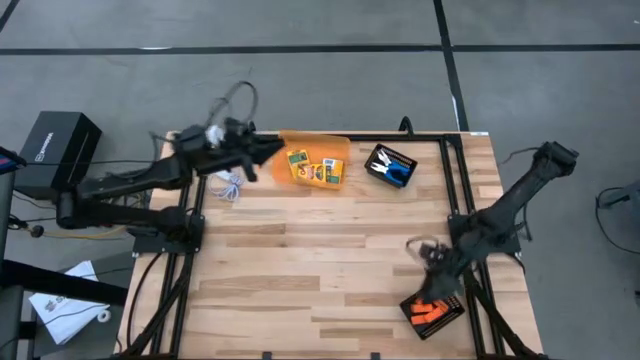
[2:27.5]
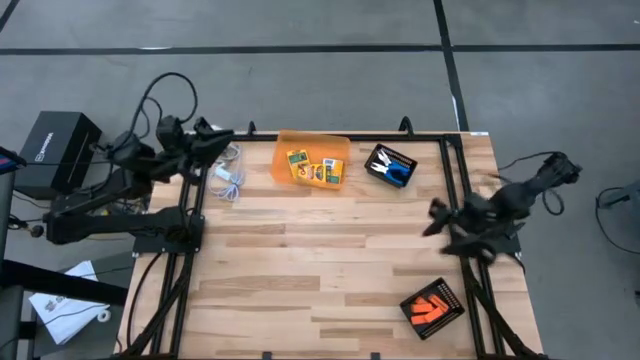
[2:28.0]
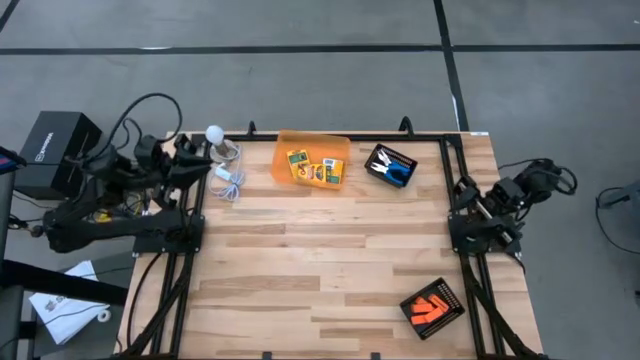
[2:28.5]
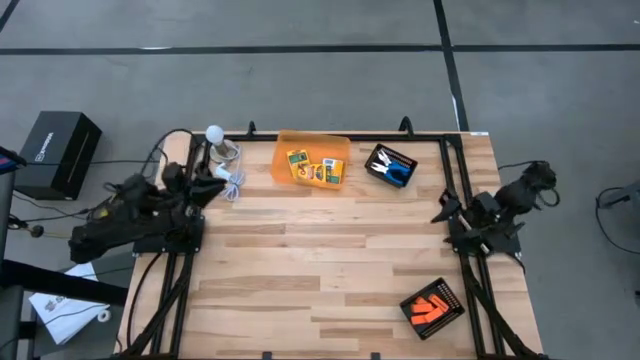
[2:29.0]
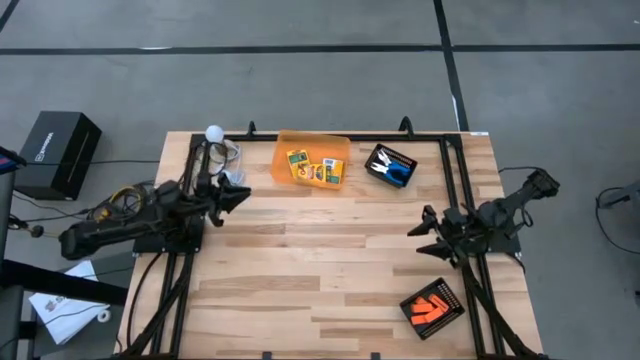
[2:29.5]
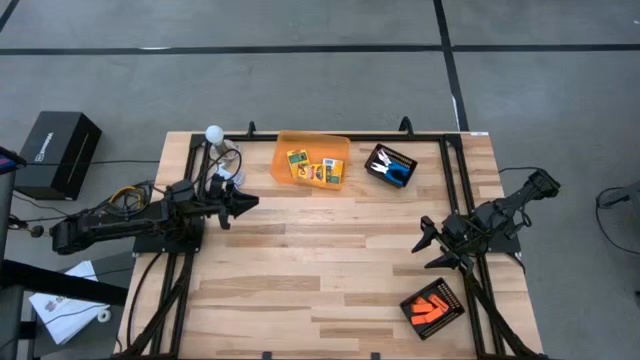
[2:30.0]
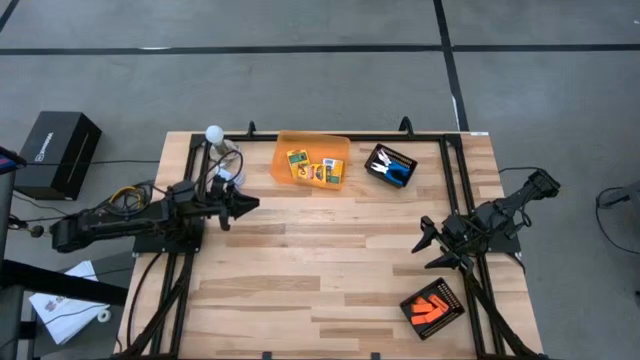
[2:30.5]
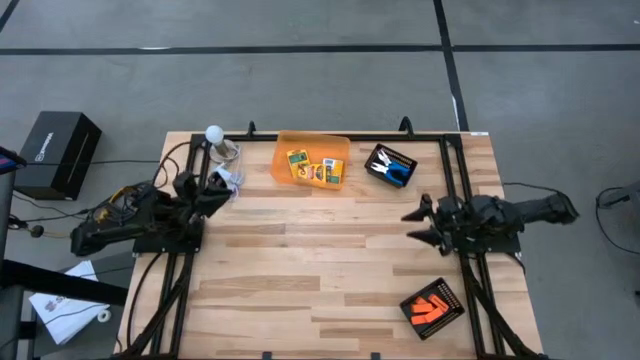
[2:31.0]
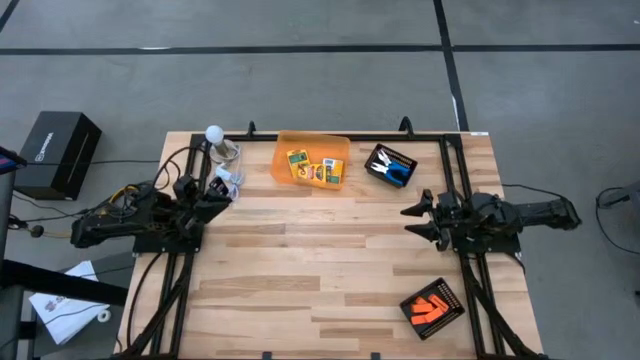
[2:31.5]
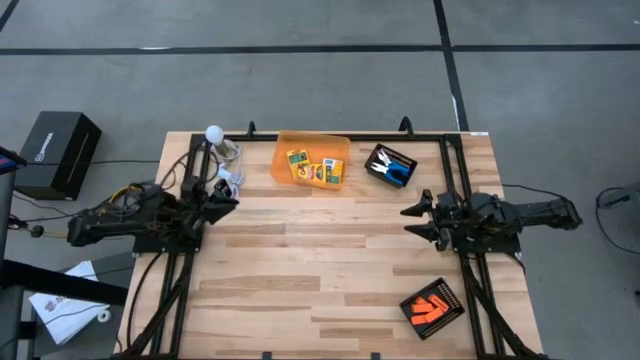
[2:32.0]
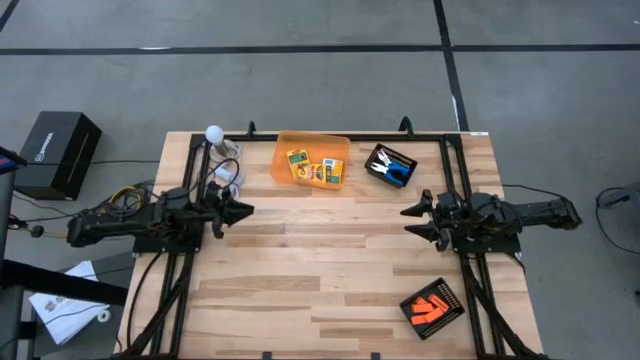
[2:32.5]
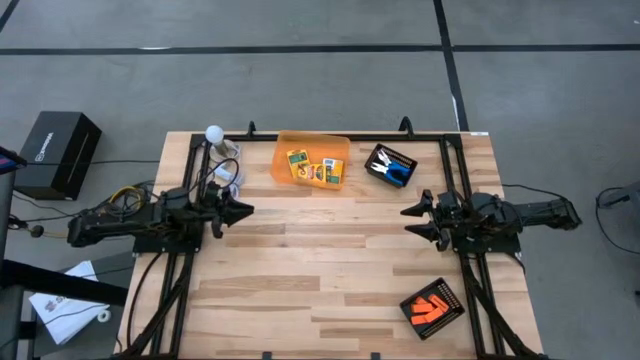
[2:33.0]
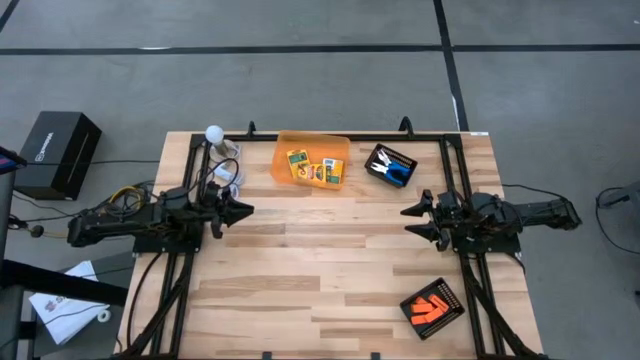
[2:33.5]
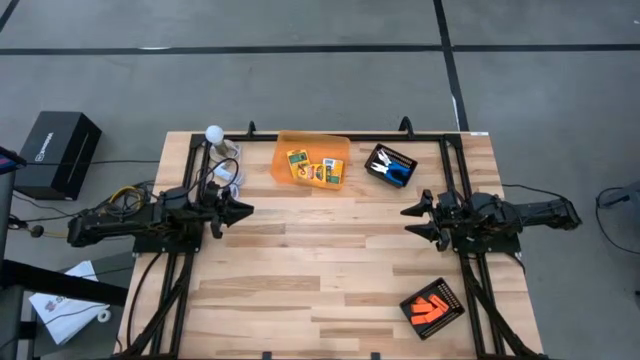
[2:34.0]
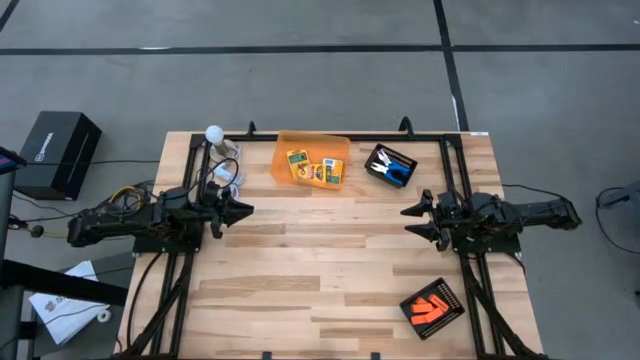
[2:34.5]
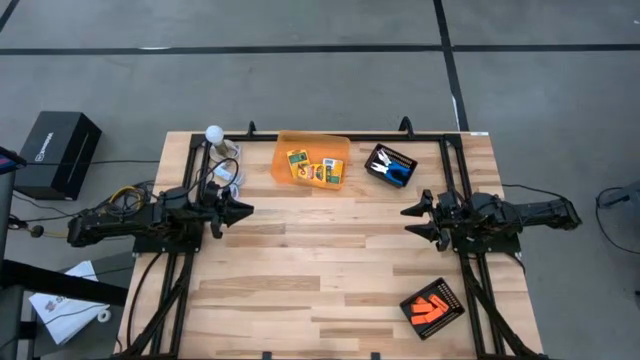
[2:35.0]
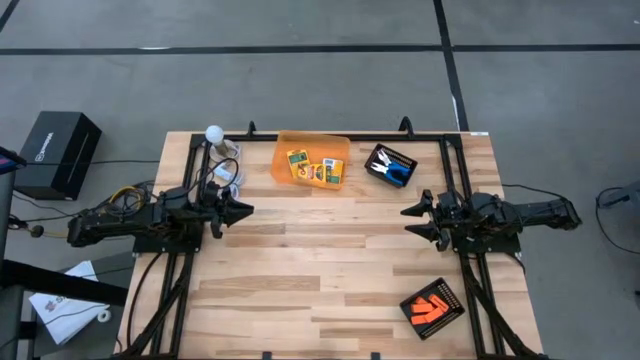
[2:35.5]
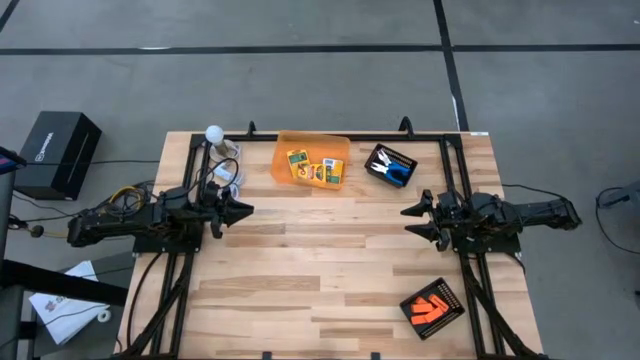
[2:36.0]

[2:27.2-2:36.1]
Task: Pick & Place School Supplies
Return to Home Position

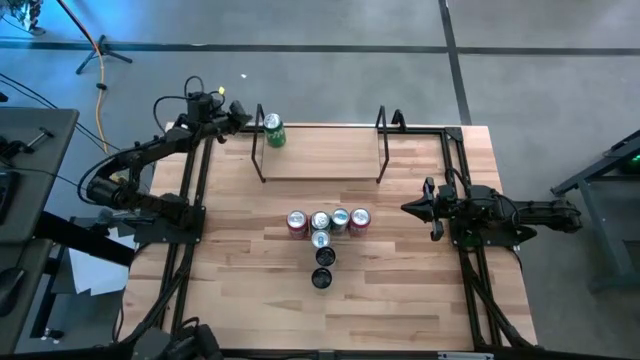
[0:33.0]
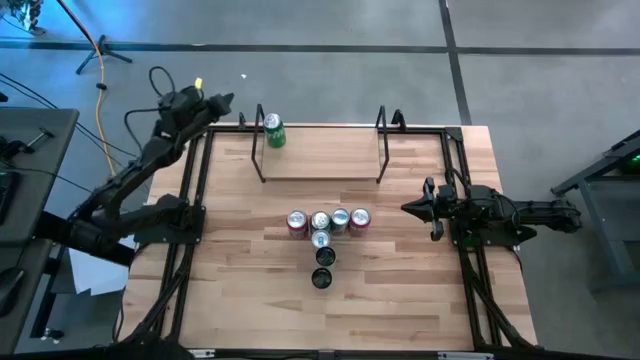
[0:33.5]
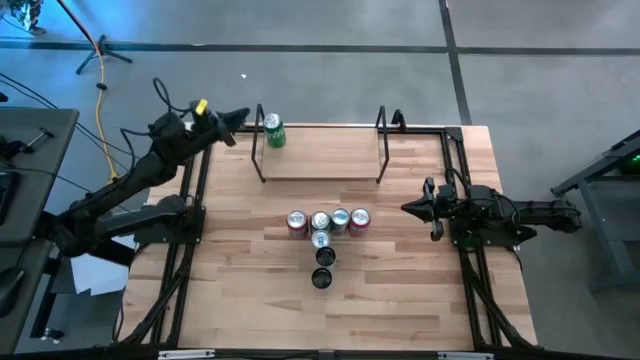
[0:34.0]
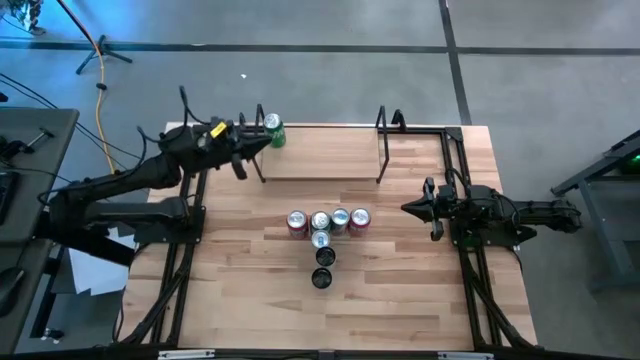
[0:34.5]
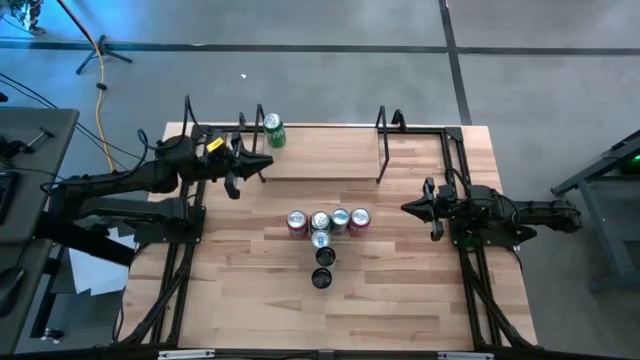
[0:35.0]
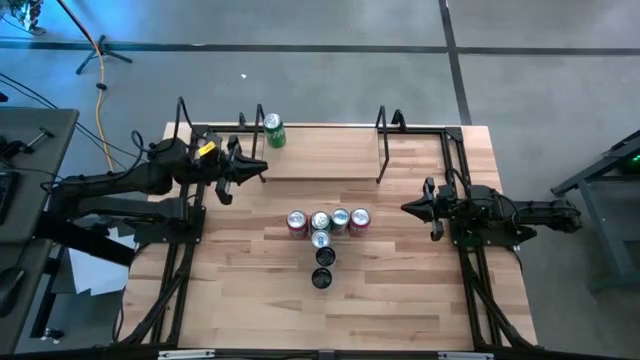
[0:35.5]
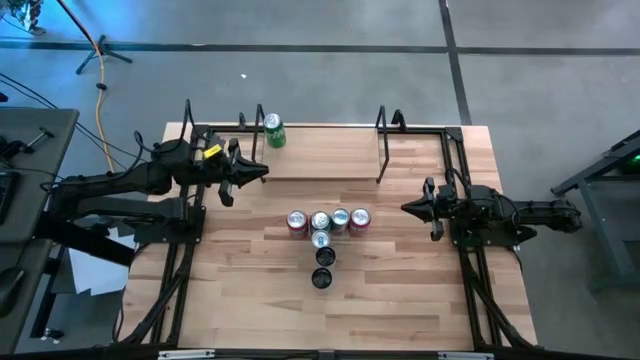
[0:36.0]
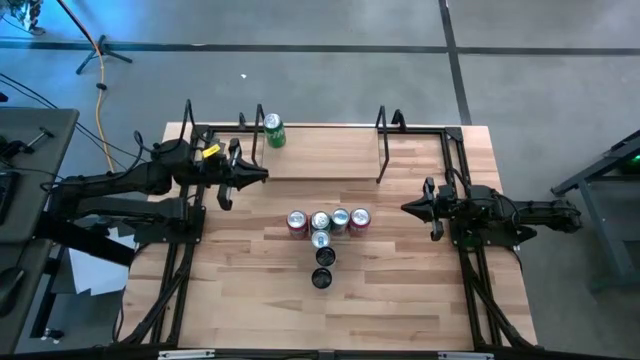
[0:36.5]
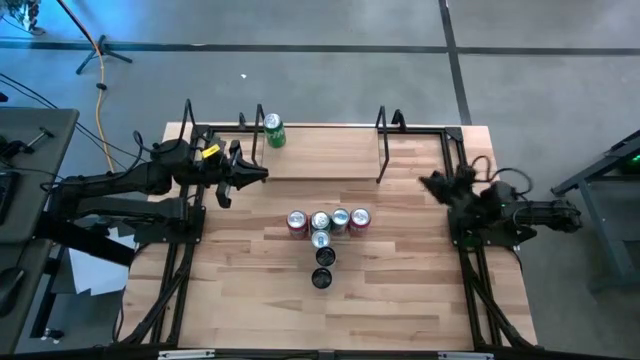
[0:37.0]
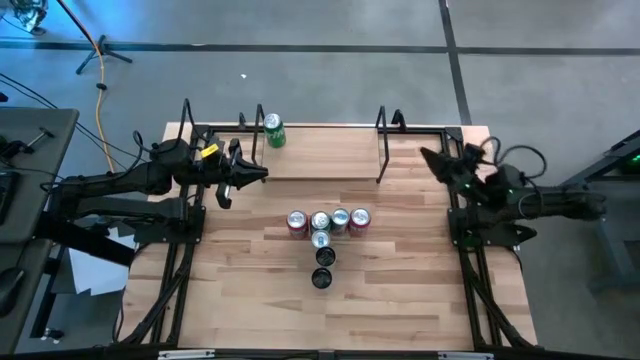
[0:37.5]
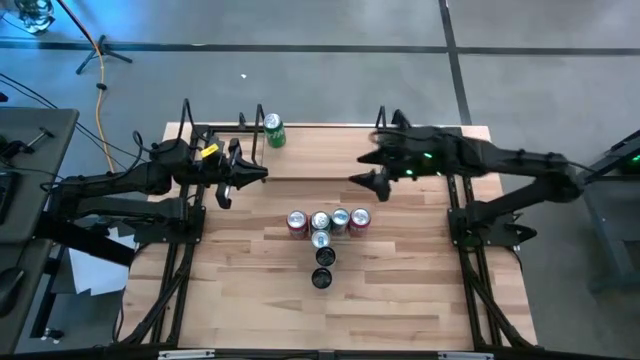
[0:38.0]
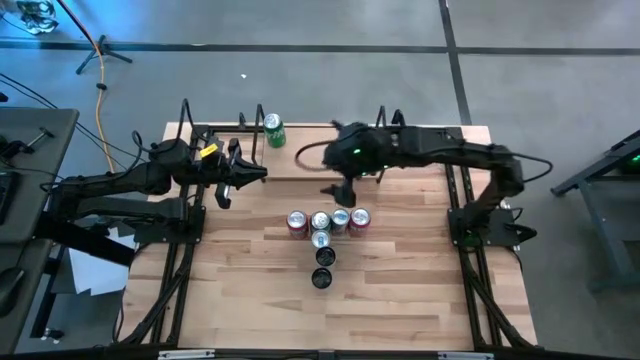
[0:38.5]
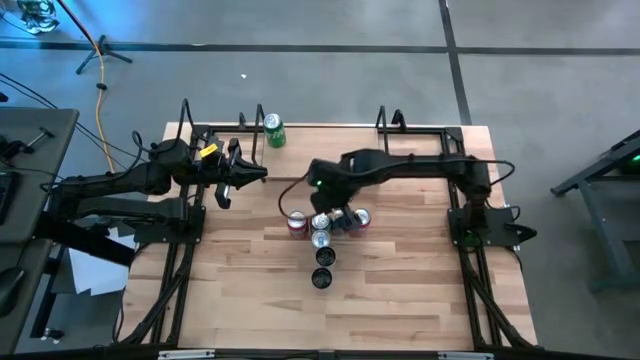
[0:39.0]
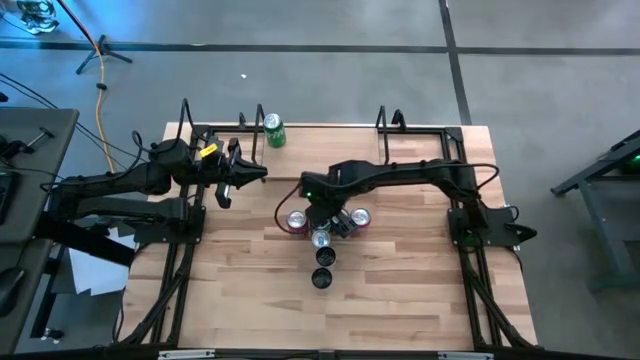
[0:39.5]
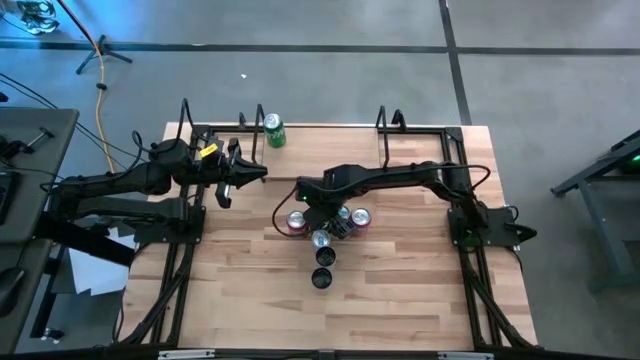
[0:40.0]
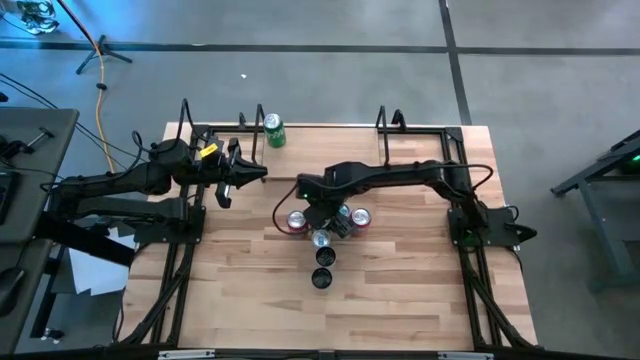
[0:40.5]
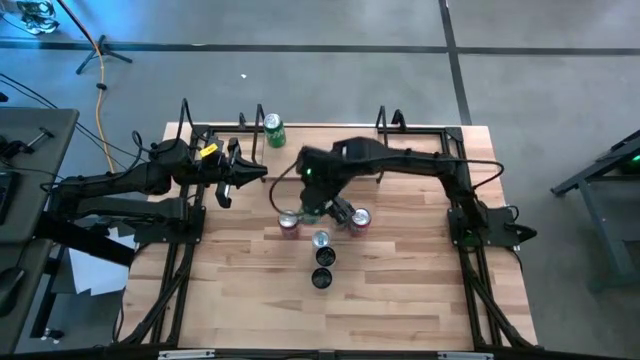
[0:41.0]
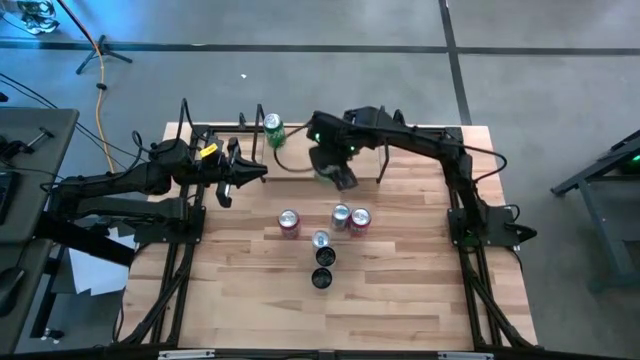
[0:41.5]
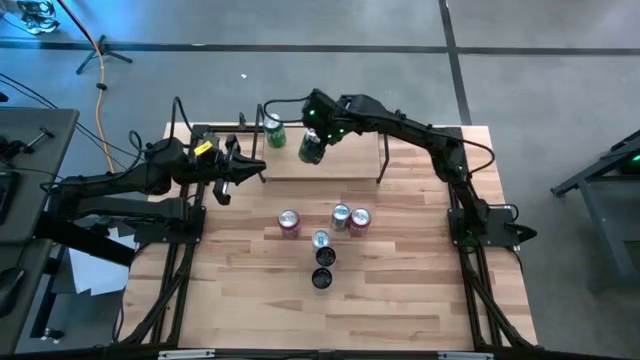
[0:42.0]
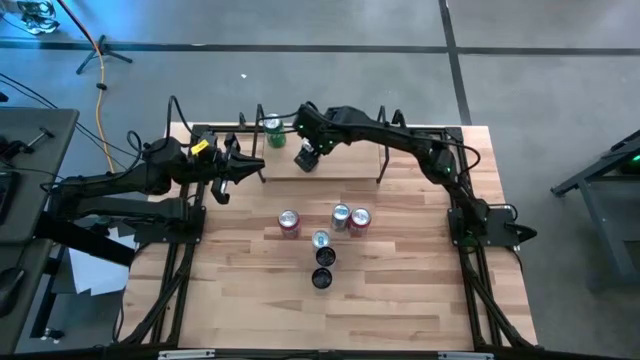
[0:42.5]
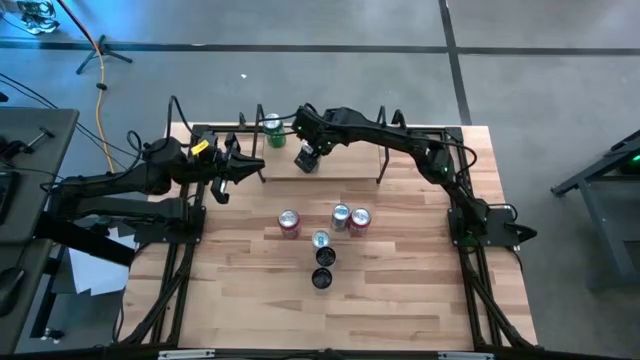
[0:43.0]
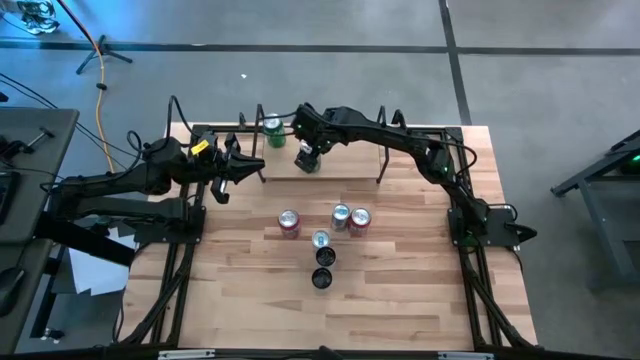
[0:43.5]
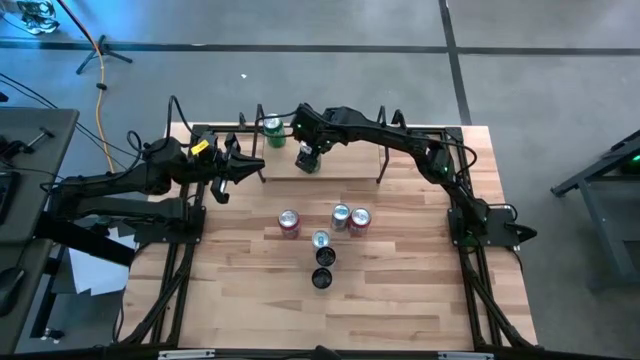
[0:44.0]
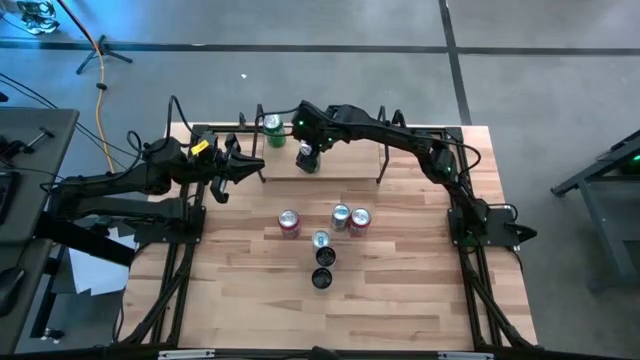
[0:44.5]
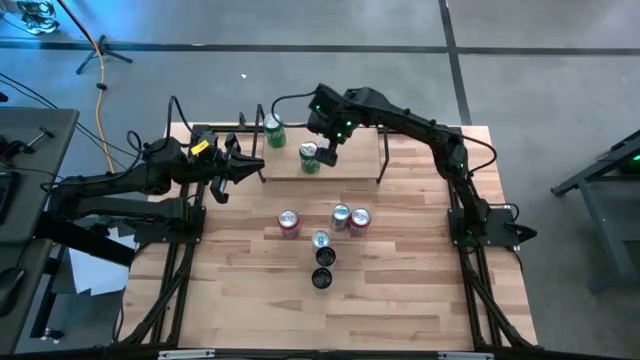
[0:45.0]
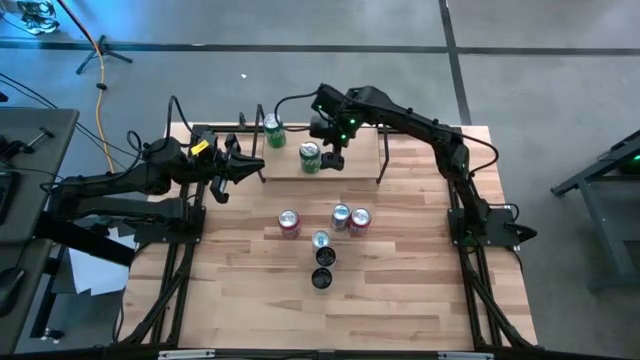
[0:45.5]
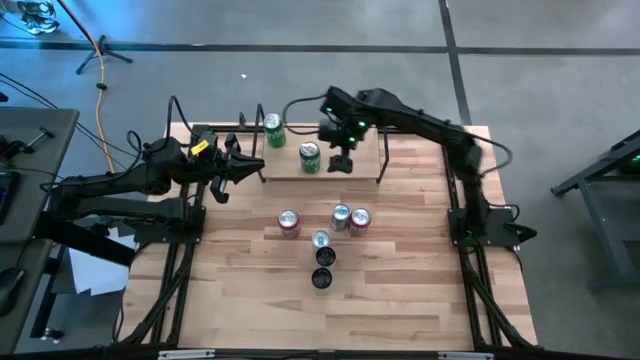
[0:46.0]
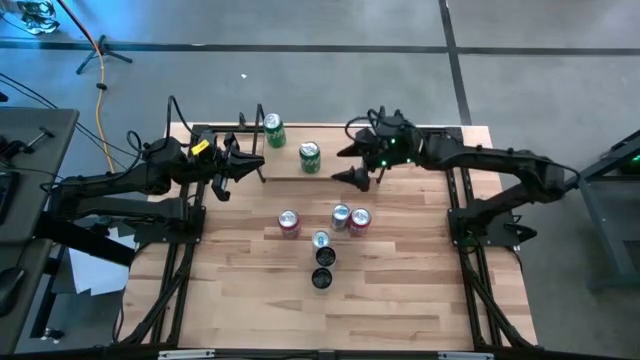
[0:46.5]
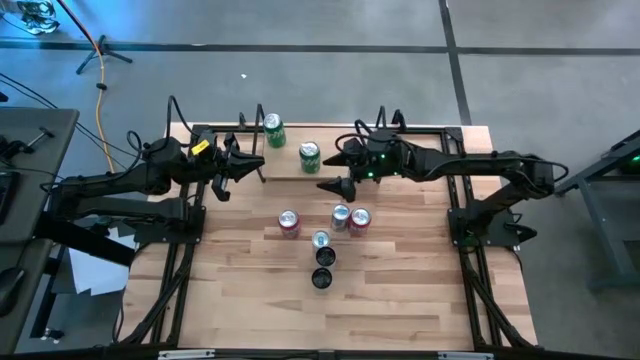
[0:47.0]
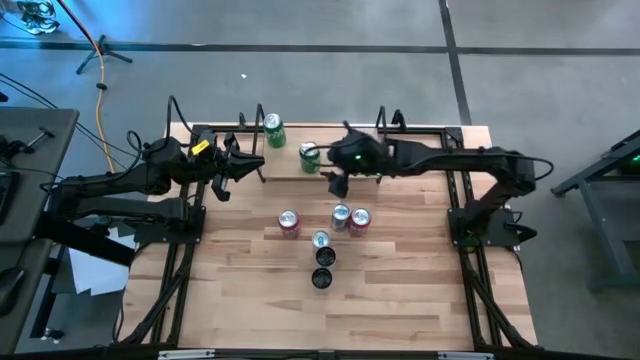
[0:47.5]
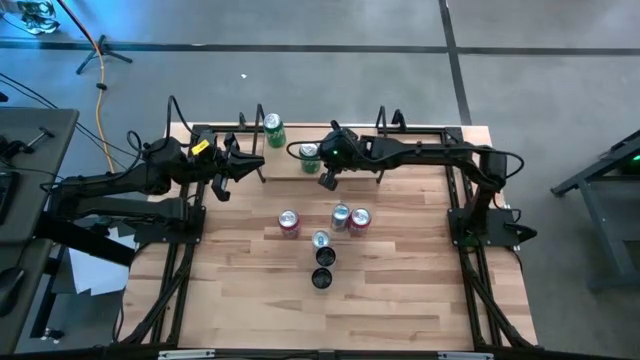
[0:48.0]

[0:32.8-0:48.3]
Task: Place canned beverage on shelf
Put the green soda can on the shelf aligned with the green soda can
